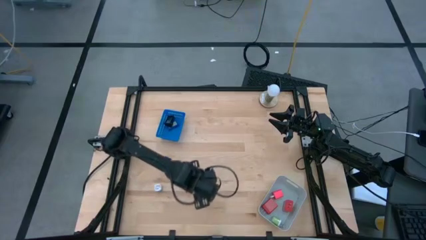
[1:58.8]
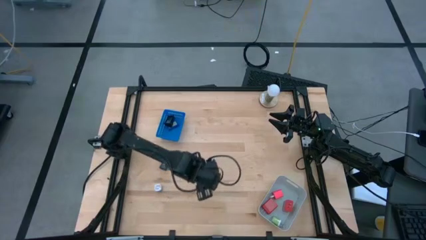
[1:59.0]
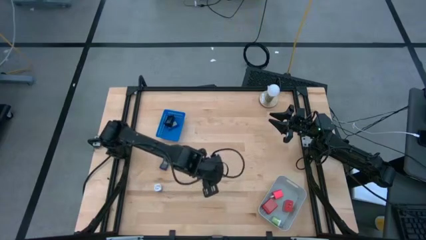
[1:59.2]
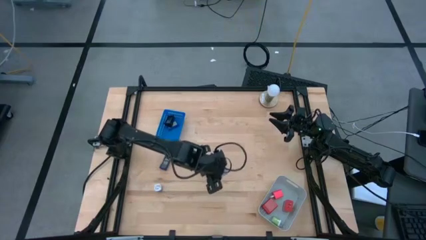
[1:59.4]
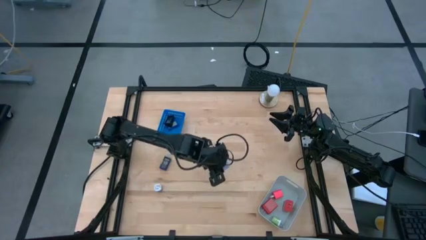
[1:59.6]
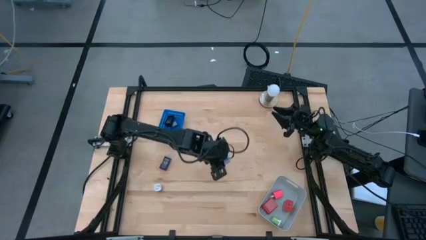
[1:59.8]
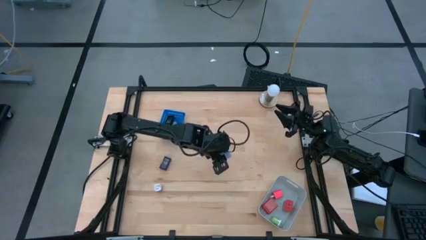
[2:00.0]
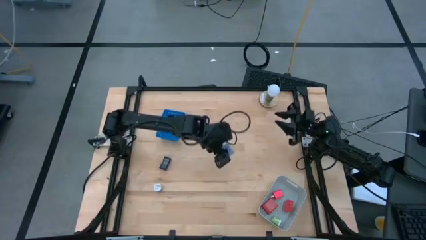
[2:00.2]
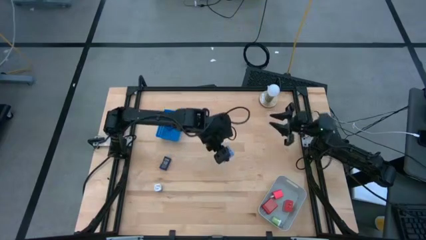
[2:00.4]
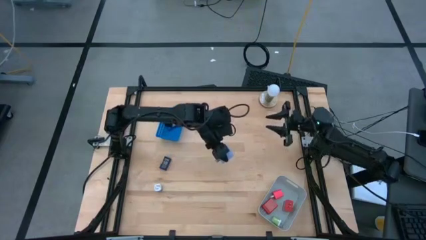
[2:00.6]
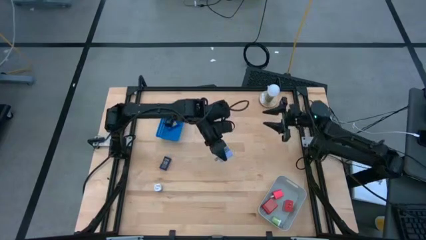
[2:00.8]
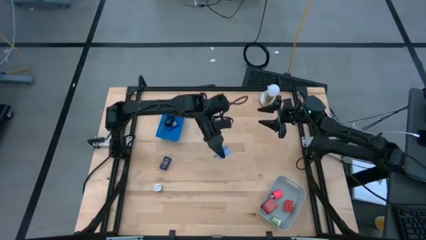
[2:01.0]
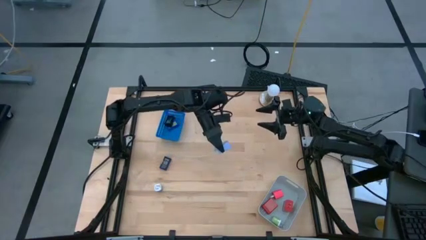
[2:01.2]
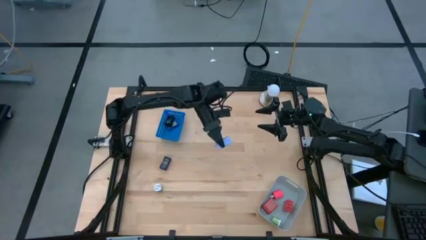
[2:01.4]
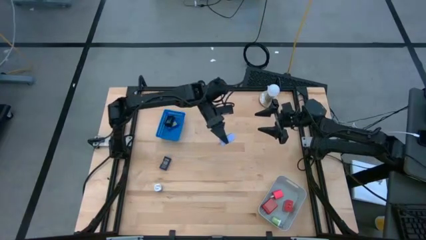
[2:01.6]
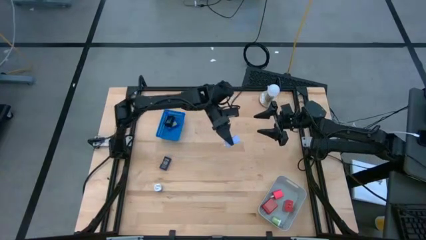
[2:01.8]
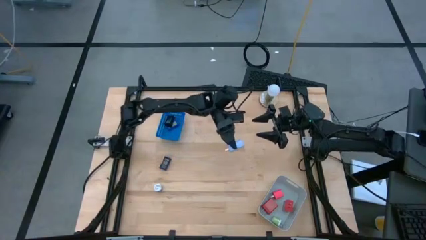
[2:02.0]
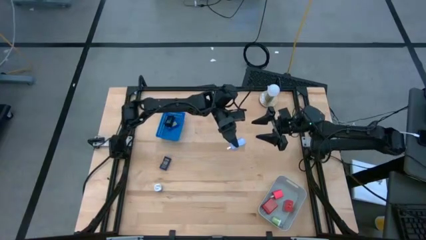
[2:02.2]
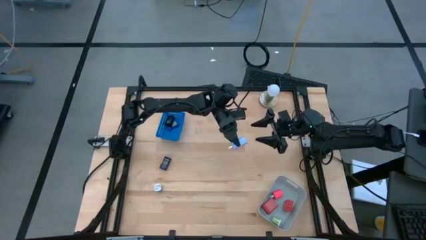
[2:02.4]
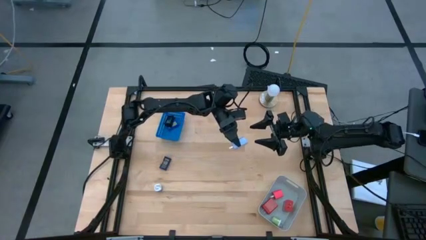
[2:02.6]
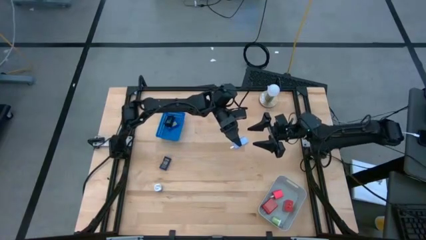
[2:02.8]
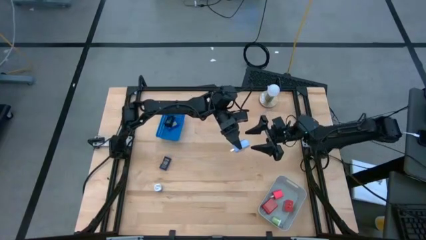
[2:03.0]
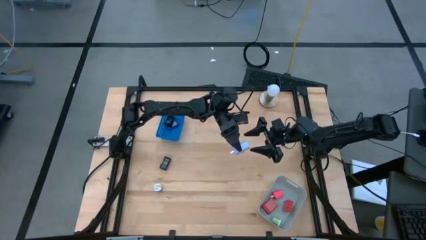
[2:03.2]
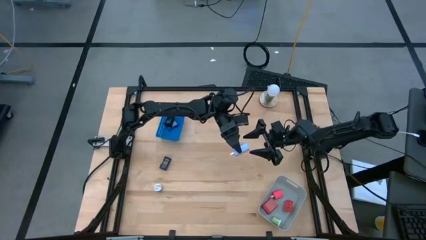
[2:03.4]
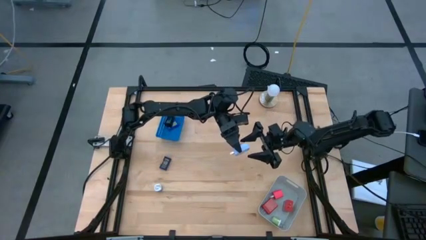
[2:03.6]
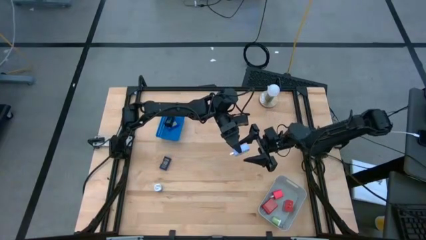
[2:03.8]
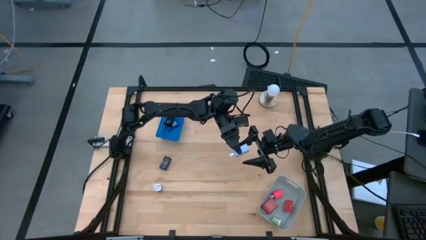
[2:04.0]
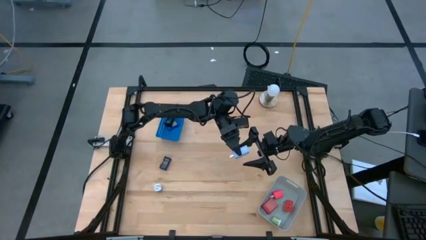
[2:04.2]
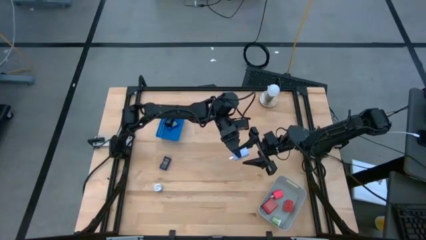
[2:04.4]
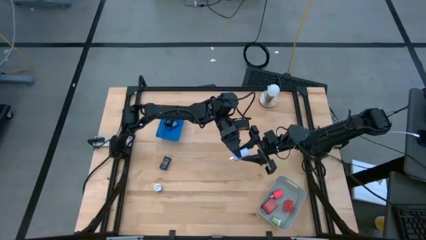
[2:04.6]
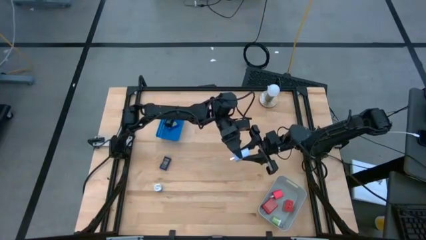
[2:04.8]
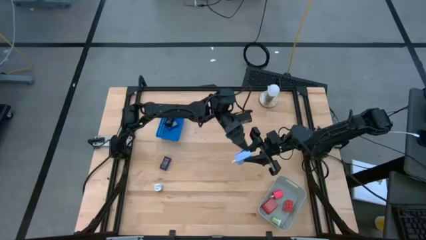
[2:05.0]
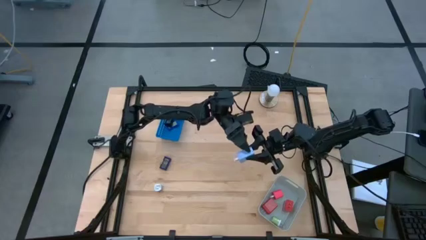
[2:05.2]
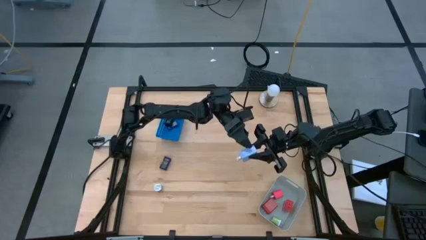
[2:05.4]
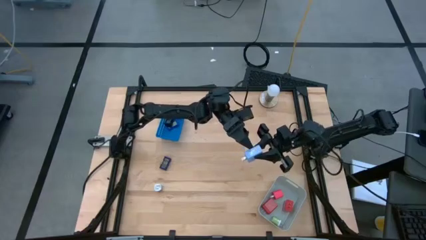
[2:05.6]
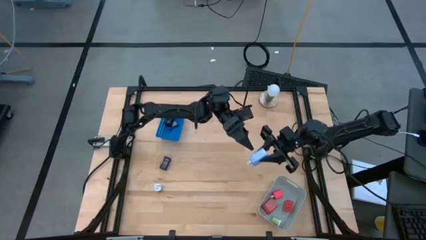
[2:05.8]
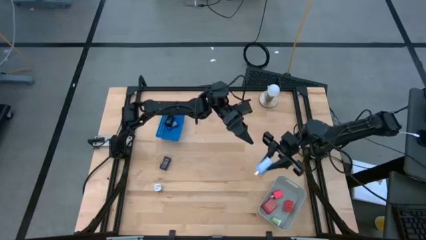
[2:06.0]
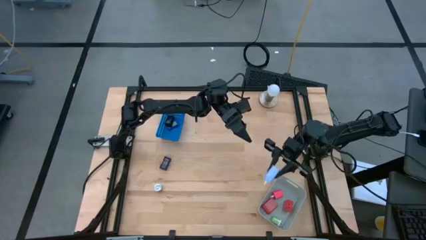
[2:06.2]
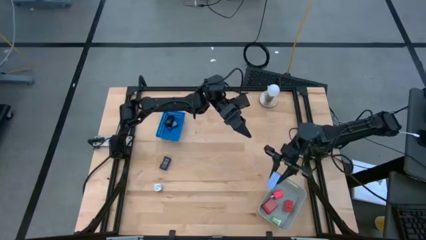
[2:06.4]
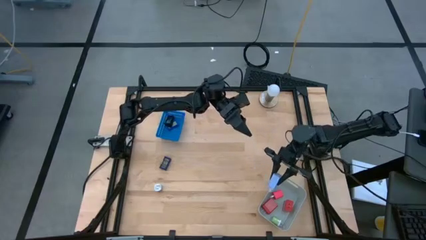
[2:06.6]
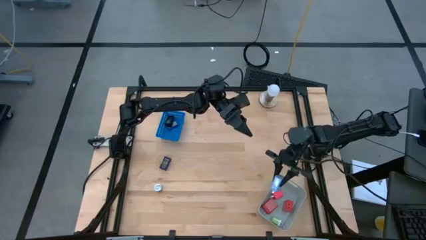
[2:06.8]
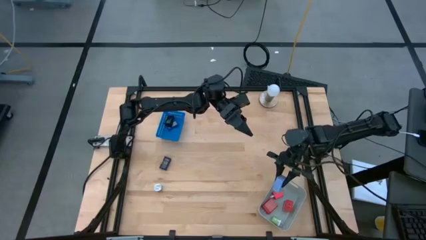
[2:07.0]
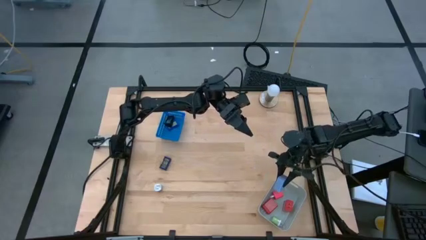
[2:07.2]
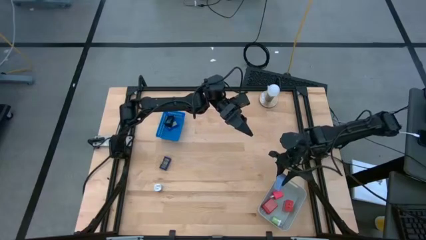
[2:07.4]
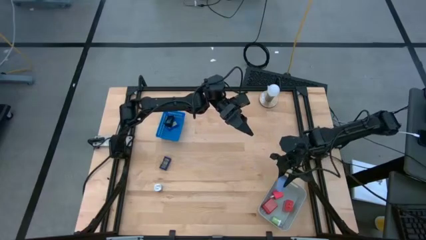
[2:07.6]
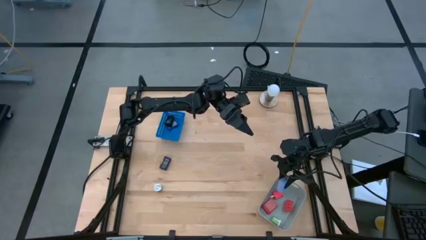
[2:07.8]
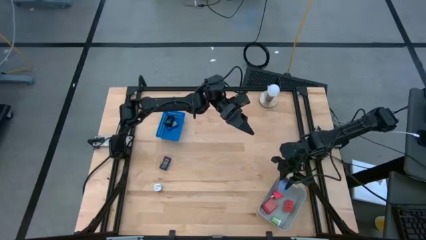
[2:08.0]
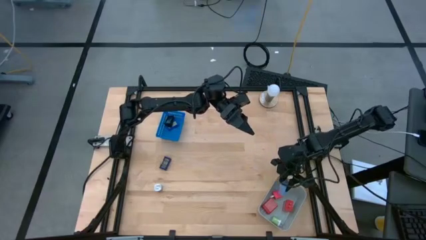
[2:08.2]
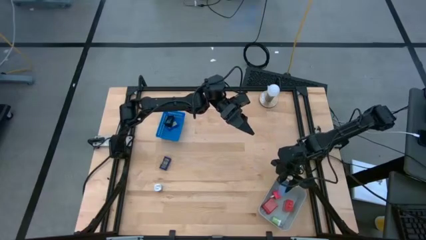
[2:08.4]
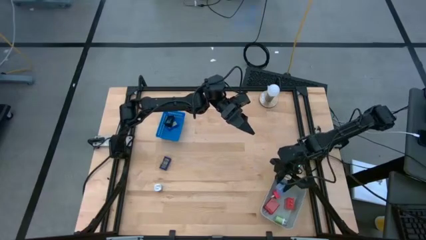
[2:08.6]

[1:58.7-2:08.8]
Task: Pick & Place Office items
Put the blue charger adapter into the white bin
